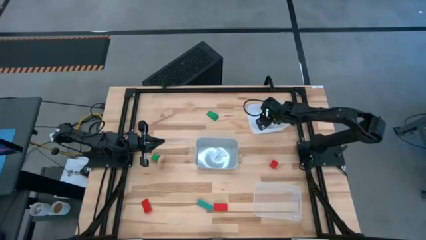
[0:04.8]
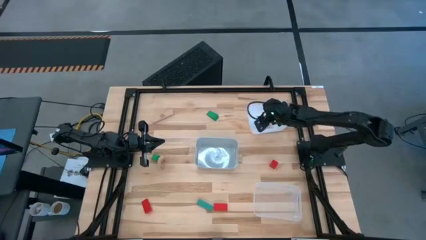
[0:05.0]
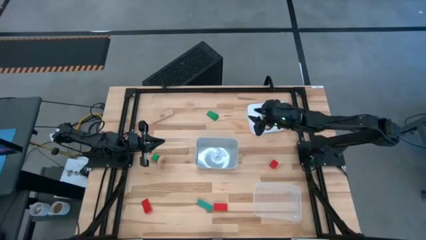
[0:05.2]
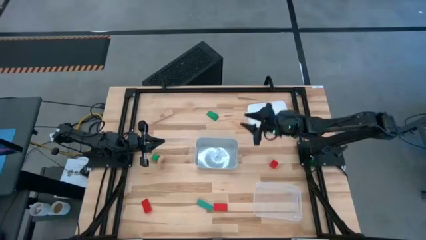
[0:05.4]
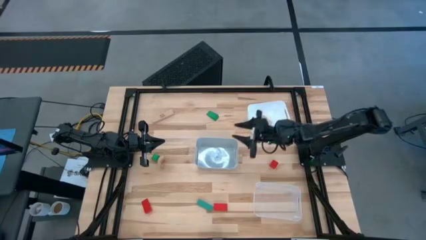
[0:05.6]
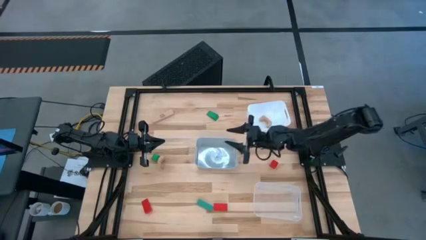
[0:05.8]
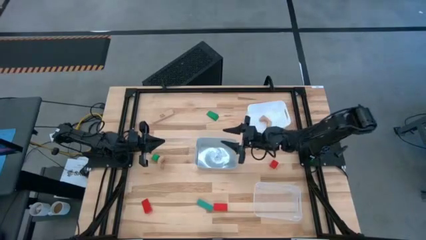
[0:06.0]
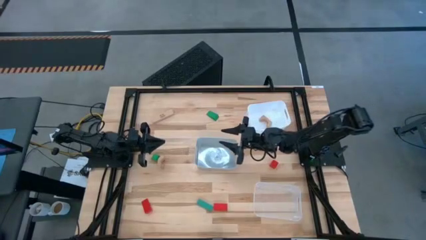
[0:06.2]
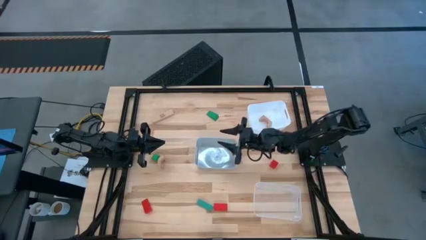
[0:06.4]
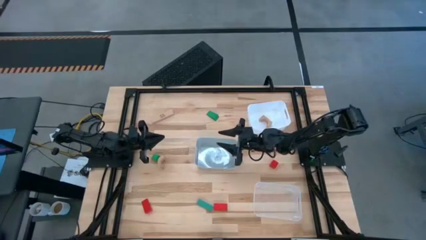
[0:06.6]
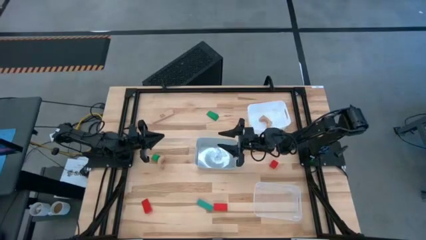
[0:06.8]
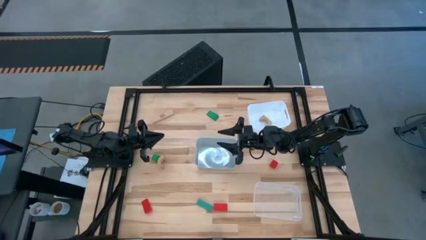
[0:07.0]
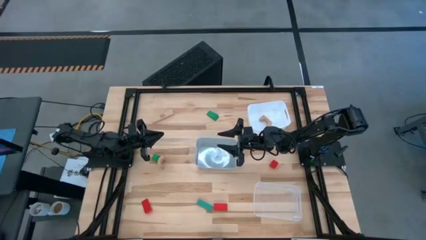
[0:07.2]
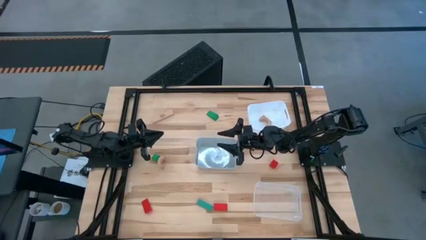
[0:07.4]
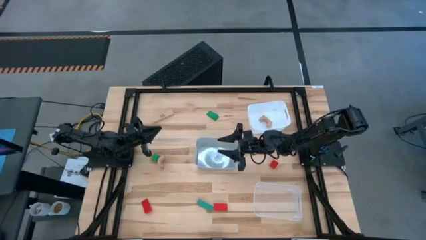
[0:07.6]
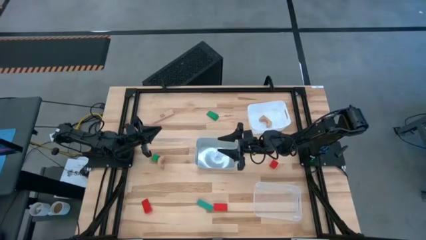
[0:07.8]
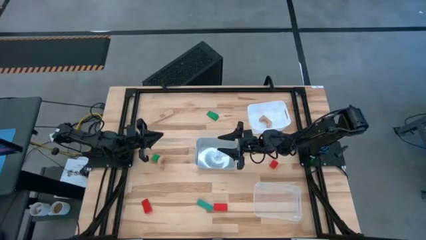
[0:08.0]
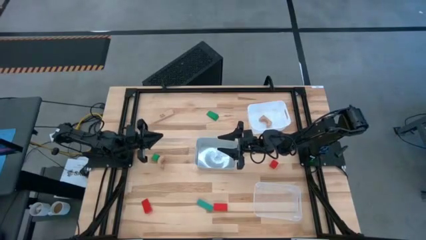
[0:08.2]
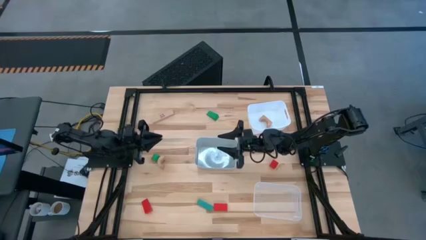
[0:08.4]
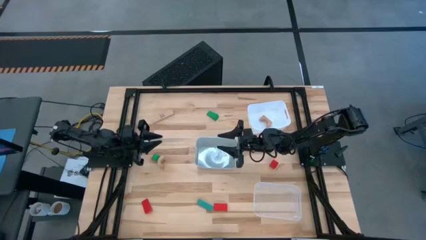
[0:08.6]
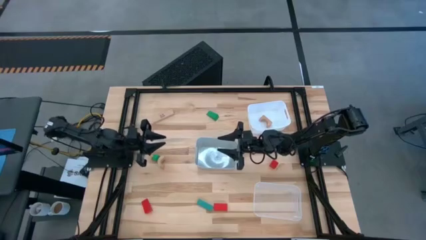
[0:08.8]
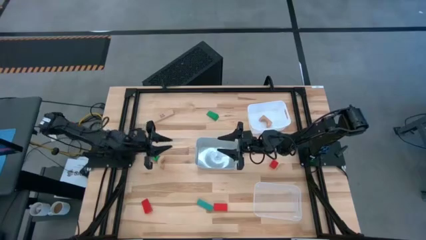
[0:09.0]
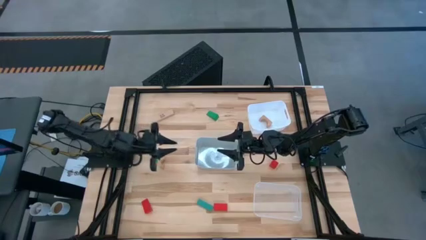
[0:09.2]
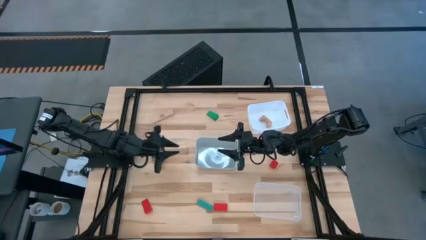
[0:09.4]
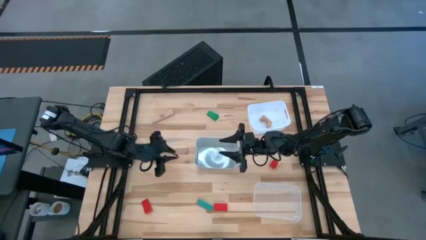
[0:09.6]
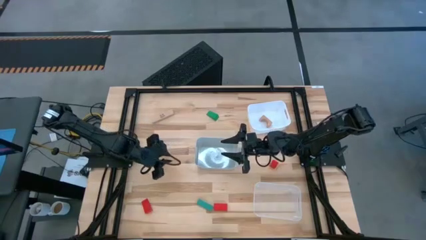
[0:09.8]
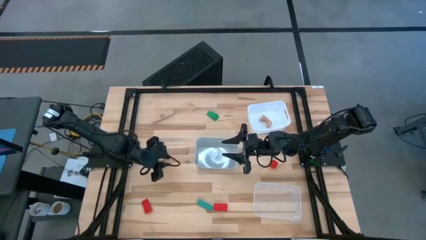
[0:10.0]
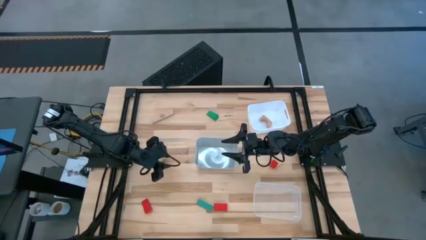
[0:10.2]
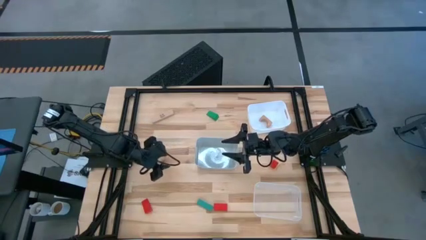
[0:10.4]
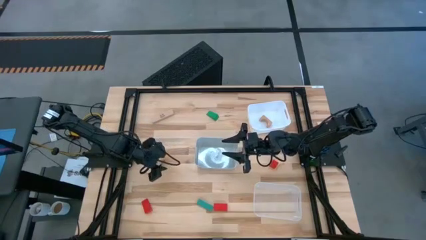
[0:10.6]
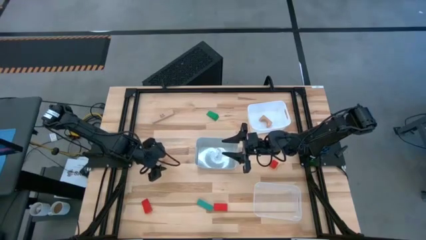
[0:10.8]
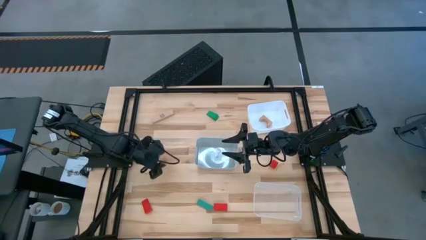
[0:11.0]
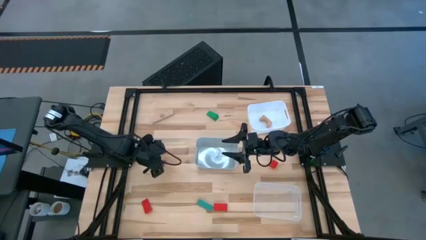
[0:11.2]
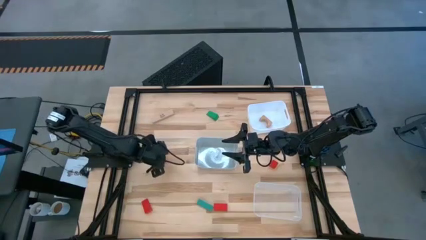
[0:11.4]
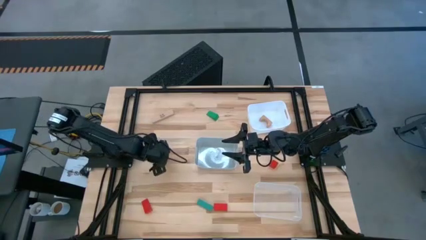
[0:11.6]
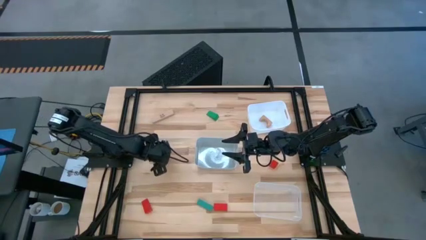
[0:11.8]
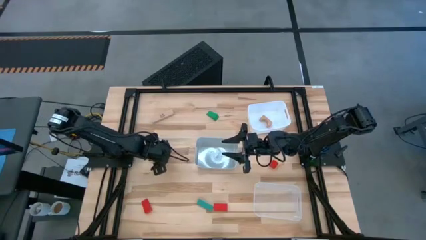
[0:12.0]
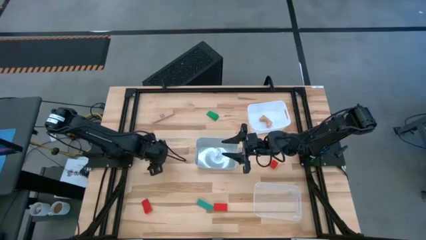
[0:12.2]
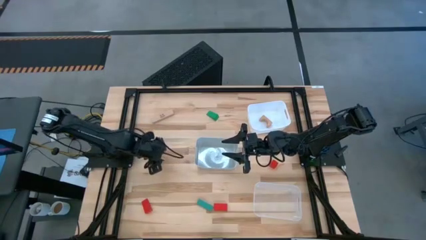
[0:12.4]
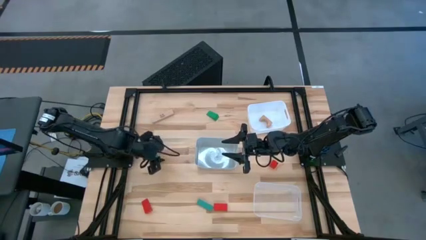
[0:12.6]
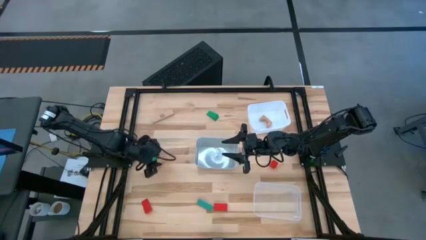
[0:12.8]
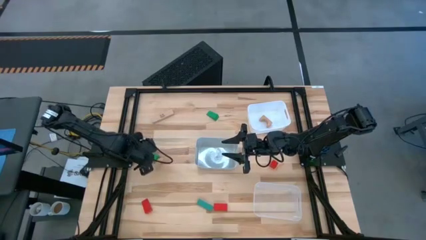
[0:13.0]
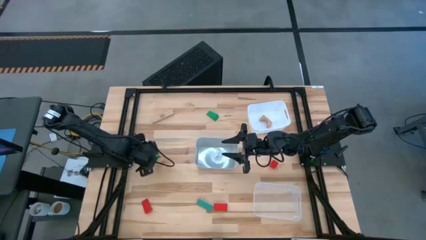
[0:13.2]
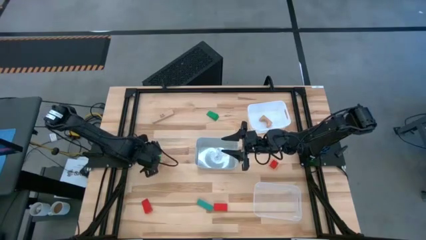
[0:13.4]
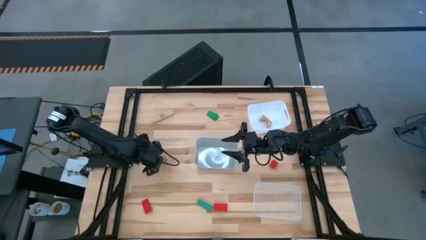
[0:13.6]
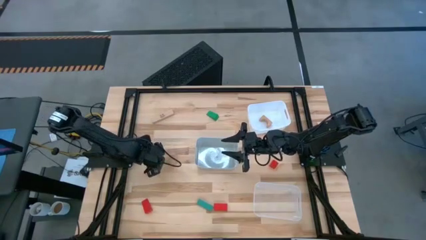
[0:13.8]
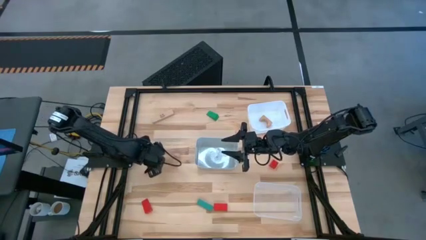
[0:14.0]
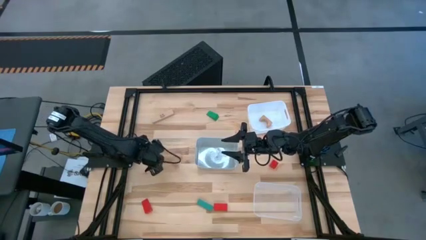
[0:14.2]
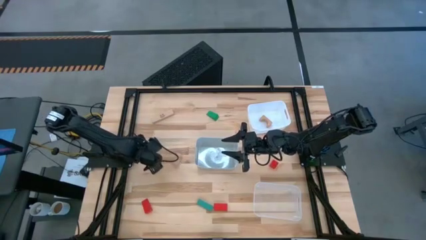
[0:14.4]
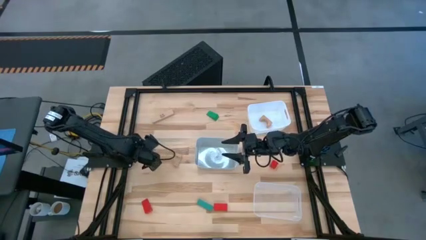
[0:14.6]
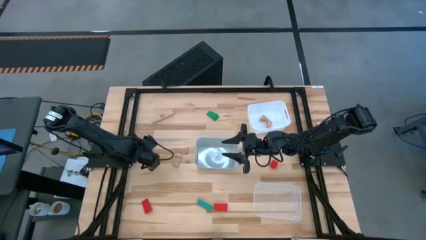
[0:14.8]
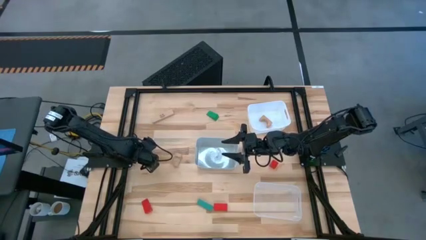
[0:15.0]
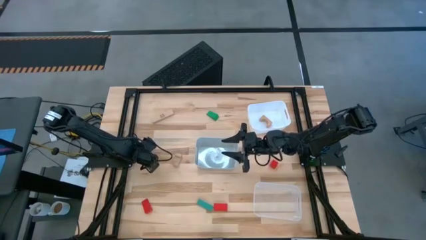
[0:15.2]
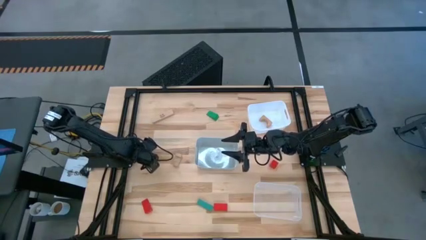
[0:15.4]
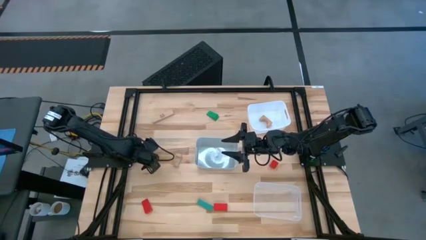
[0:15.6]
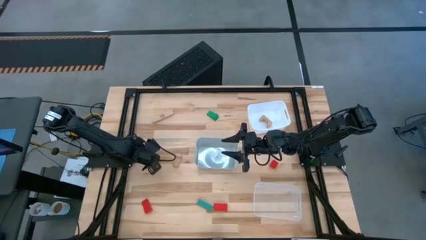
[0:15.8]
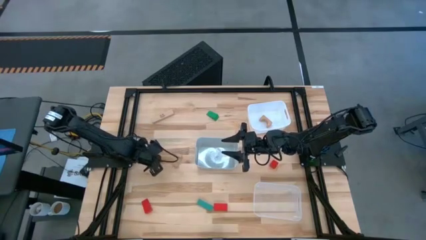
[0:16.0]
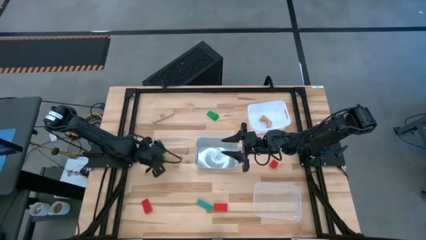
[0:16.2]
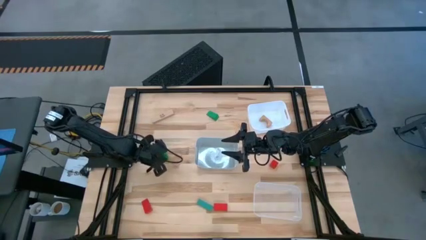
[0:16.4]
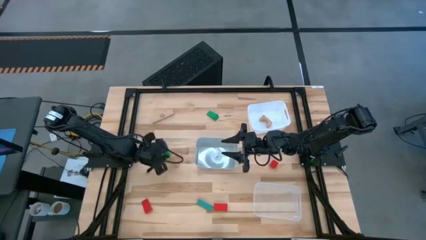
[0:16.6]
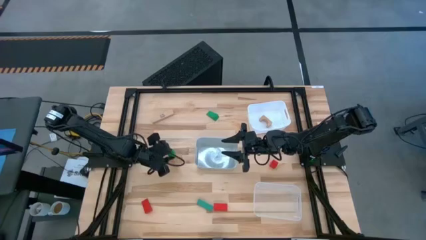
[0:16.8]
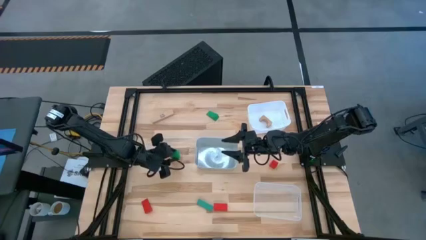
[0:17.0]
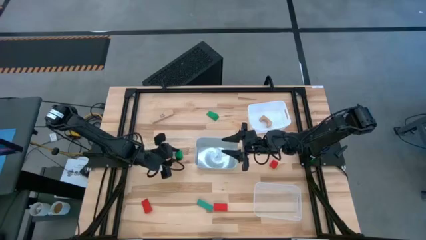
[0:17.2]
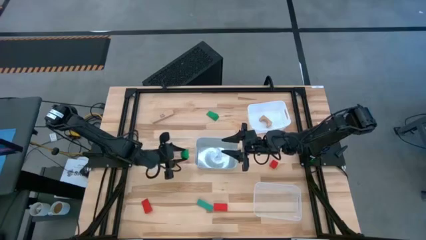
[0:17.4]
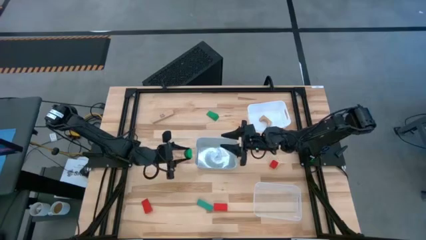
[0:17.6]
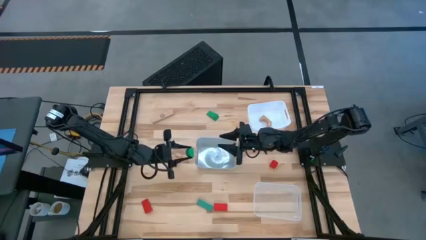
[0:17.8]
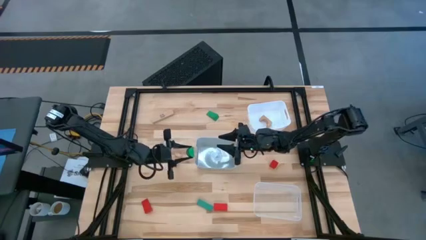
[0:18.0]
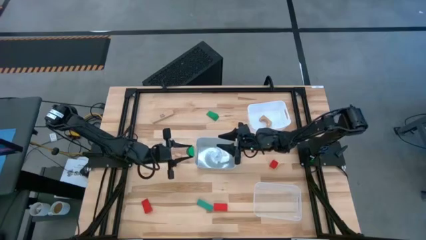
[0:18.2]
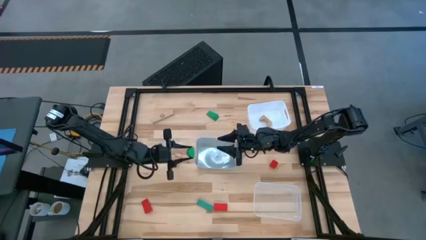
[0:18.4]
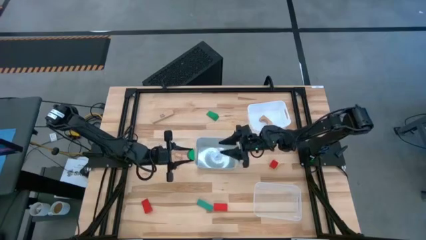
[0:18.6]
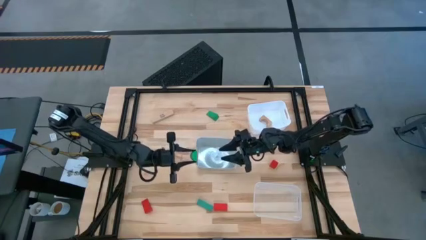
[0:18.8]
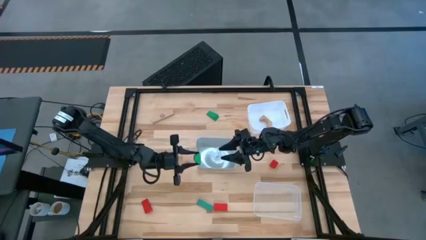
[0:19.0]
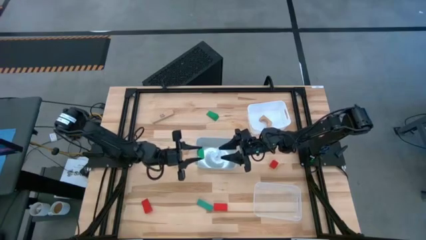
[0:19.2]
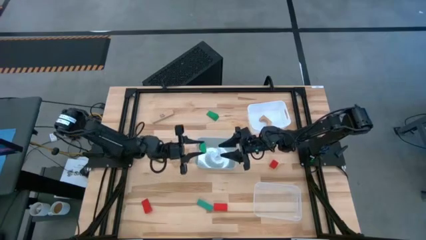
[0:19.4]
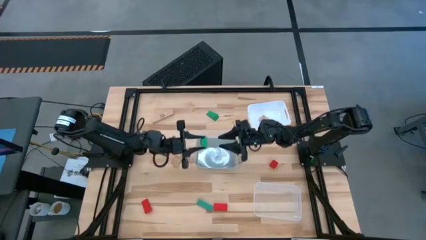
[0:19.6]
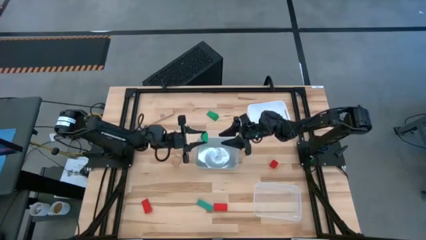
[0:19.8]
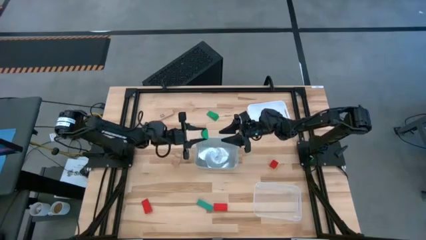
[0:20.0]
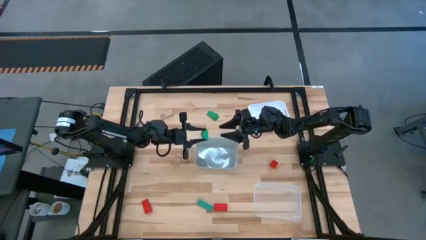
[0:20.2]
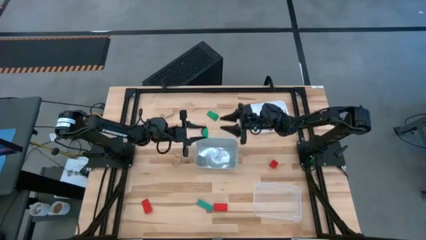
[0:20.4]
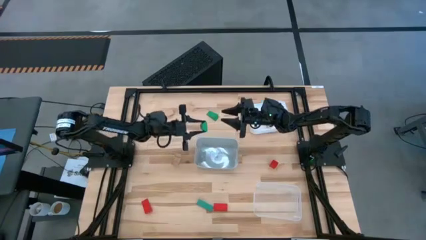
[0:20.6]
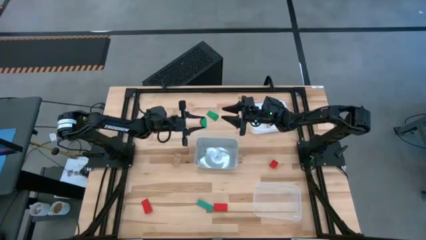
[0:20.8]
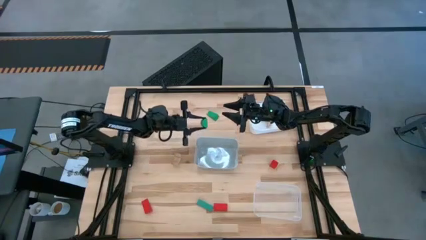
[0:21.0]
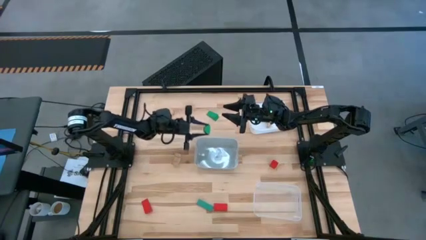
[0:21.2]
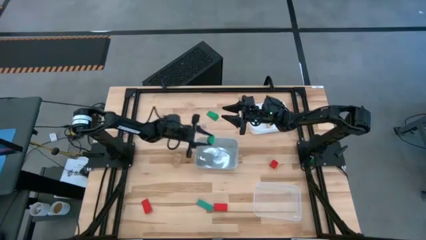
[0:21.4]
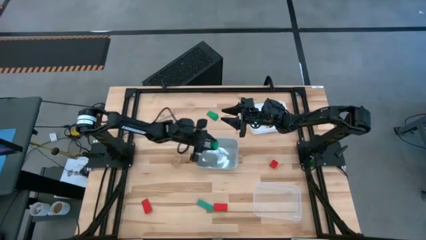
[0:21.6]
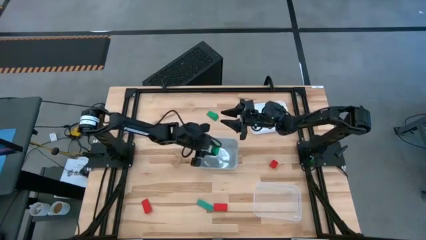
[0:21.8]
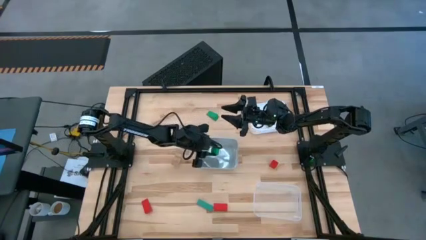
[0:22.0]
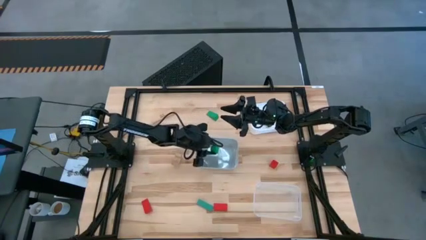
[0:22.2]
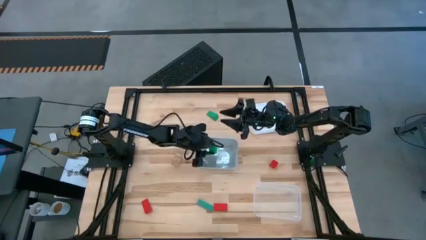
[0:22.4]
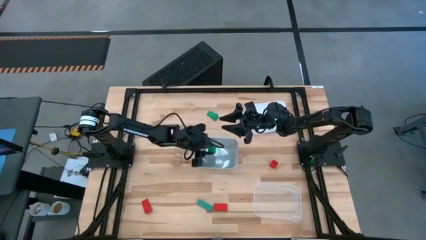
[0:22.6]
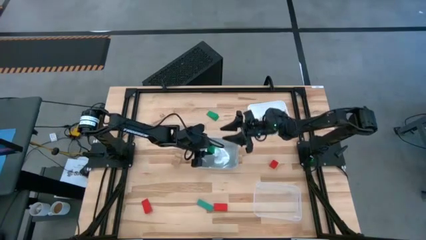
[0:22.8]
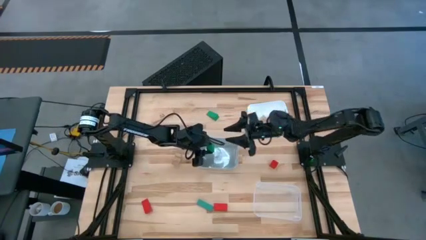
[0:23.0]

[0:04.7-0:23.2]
Task: Sort & place blocks by color
Put the middle green block into the gray bin
